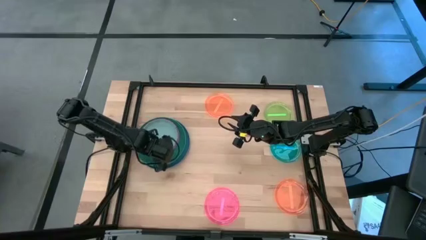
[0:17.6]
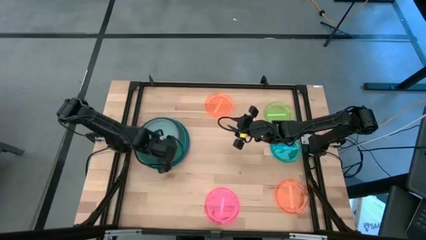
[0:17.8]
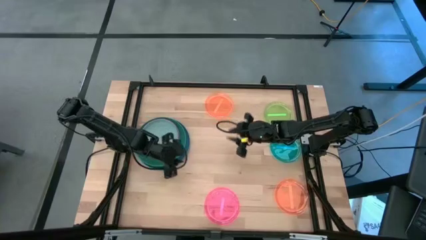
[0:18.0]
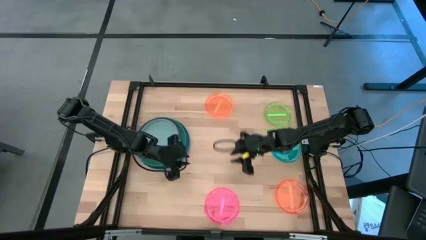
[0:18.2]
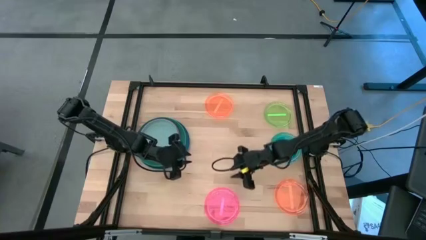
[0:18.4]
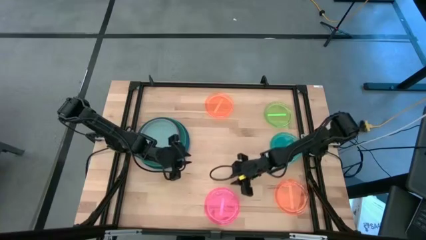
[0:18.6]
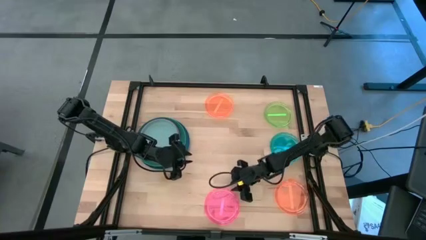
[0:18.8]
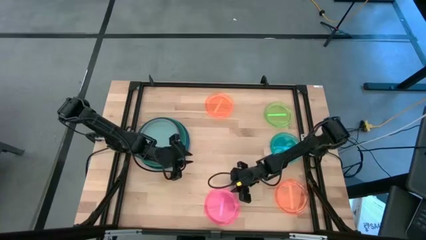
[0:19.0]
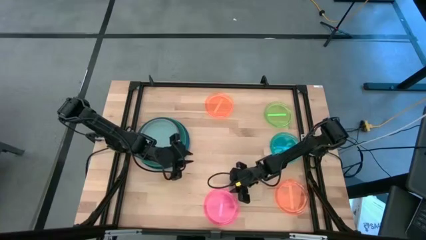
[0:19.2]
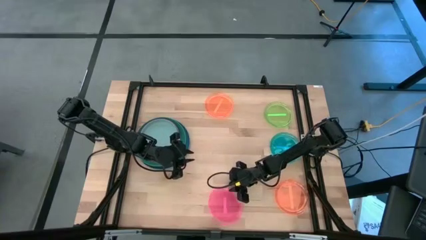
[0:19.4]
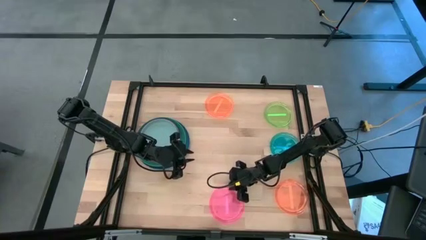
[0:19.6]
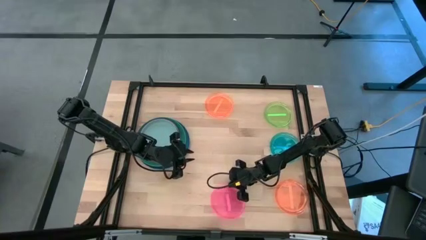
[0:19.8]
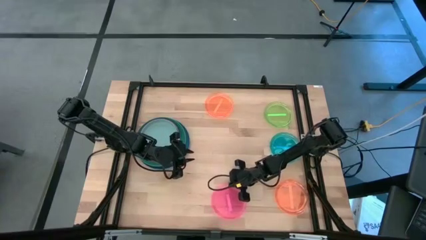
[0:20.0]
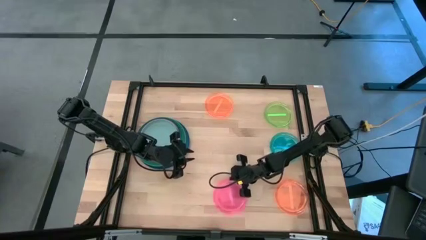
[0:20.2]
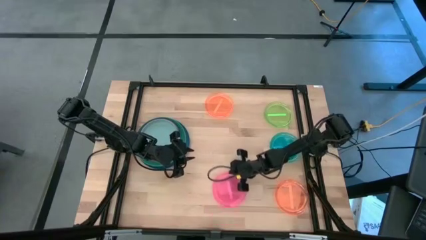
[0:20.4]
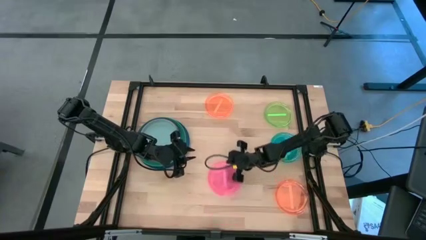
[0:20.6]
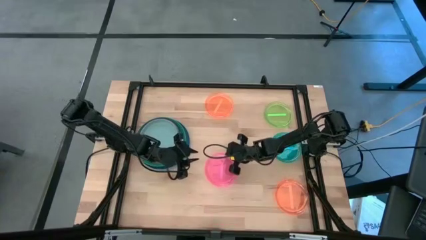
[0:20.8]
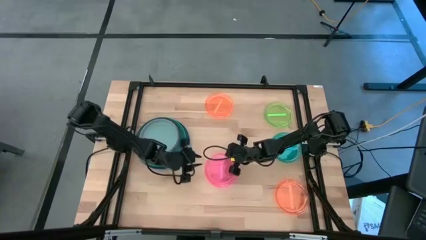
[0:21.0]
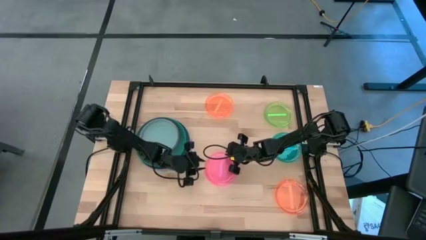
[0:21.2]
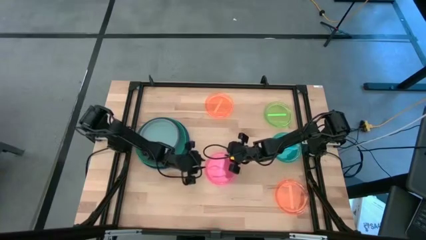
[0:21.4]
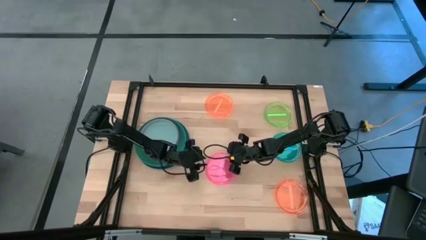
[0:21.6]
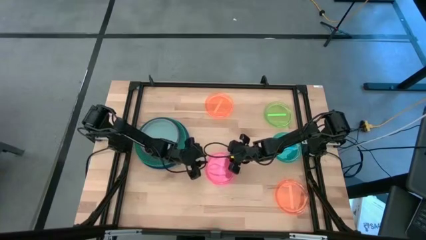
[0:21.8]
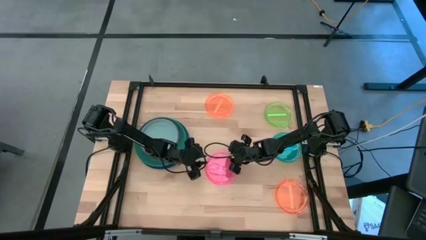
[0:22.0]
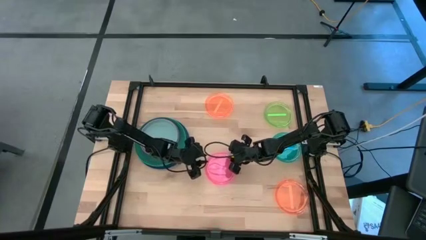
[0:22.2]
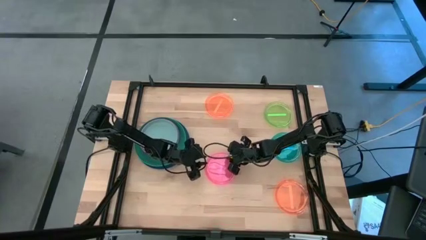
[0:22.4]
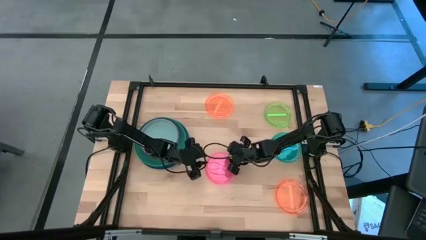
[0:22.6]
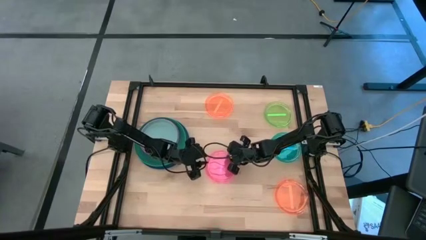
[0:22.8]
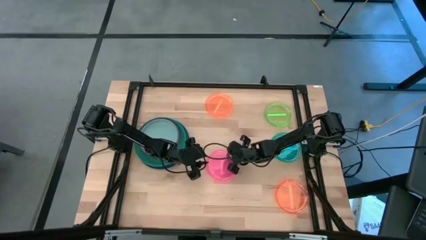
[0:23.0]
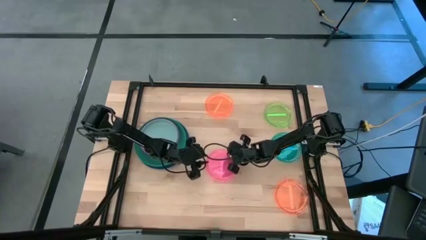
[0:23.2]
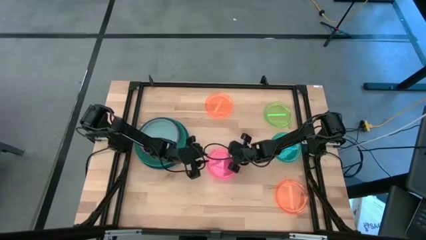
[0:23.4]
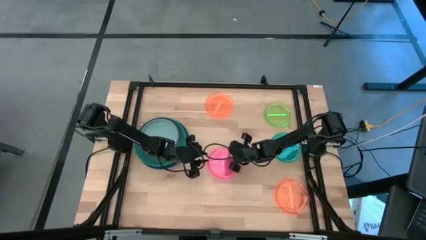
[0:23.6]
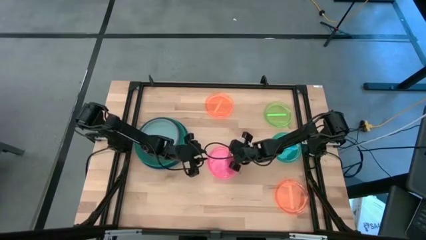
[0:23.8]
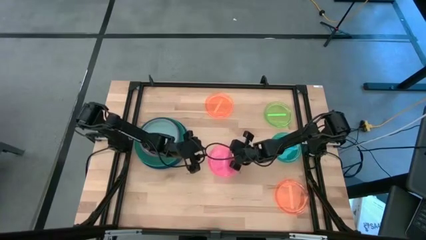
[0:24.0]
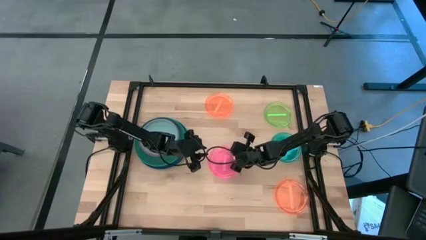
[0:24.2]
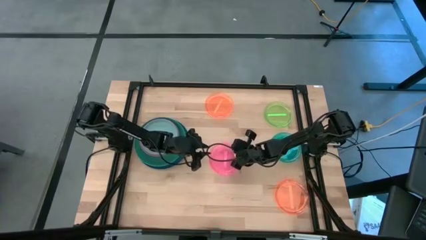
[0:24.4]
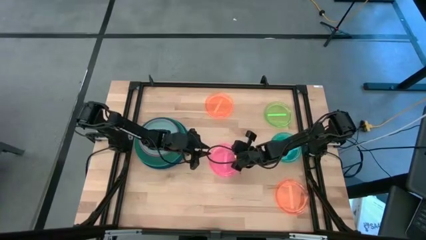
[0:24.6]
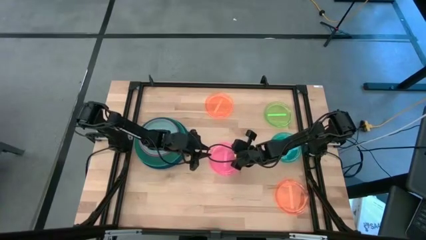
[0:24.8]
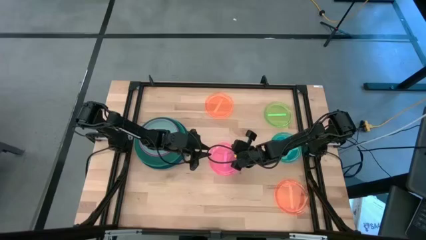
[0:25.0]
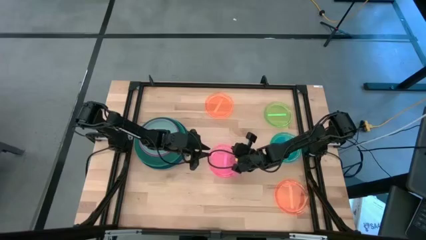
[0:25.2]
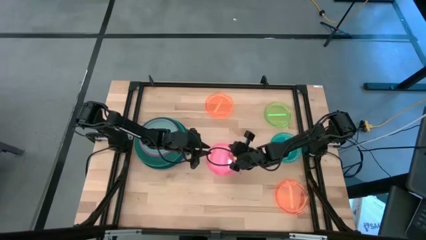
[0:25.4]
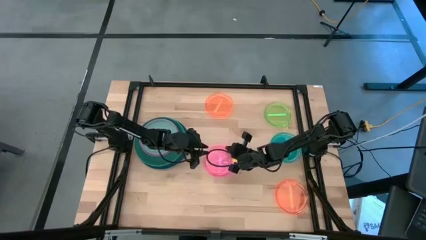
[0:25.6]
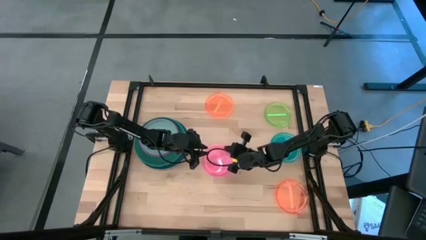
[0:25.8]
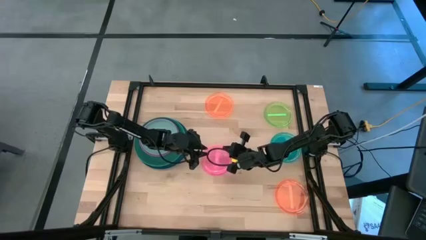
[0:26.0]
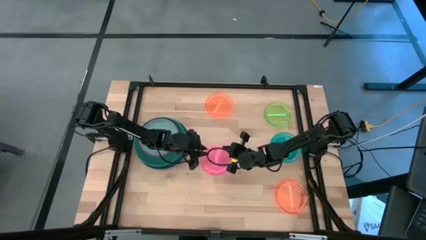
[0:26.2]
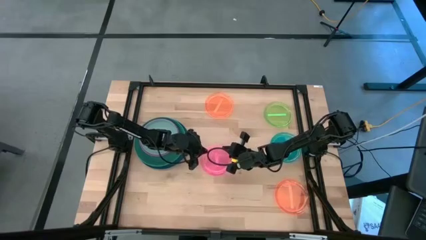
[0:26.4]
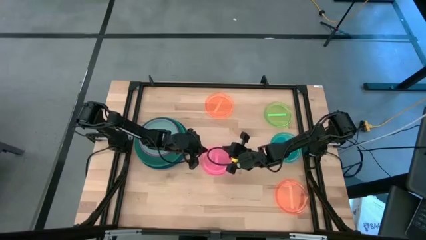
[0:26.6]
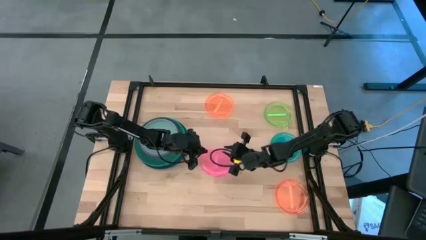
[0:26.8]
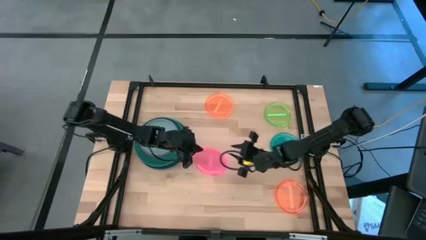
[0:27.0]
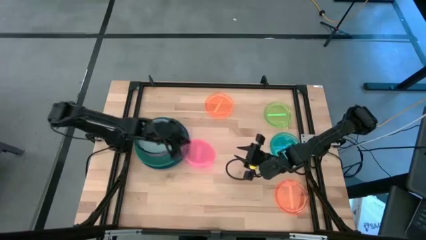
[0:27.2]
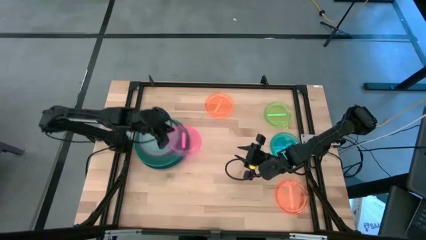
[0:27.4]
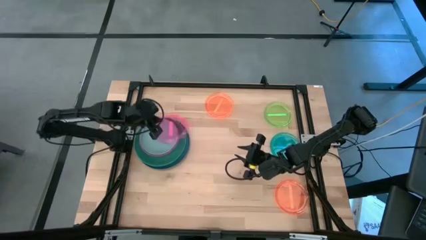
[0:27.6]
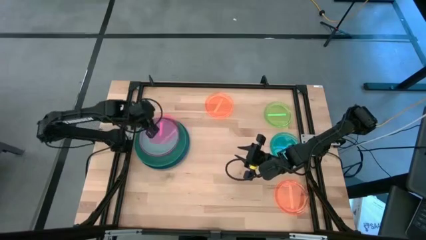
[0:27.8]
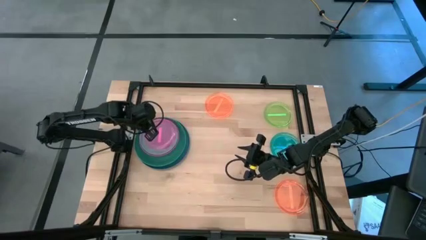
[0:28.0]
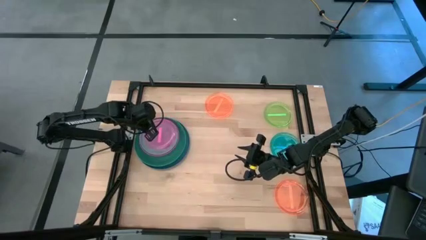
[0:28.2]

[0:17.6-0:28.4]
Task: Stack plastic plates
Stack the small light pink plate on top of the medium light blue plate

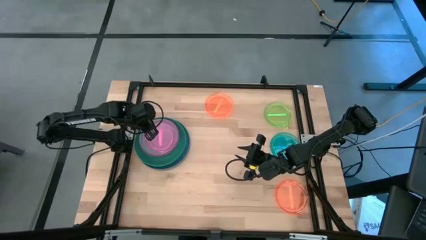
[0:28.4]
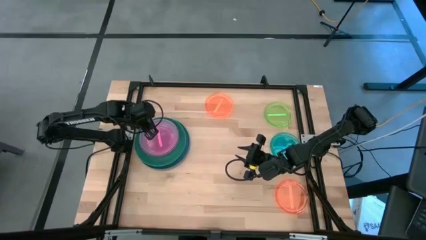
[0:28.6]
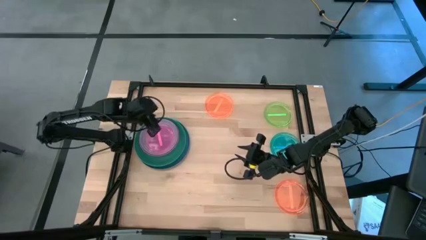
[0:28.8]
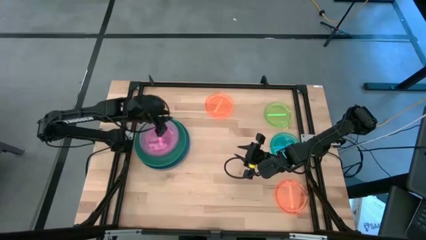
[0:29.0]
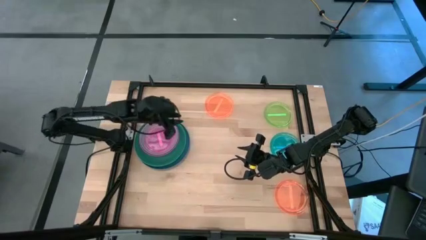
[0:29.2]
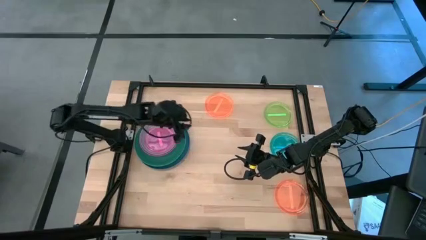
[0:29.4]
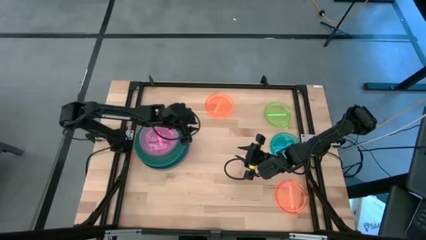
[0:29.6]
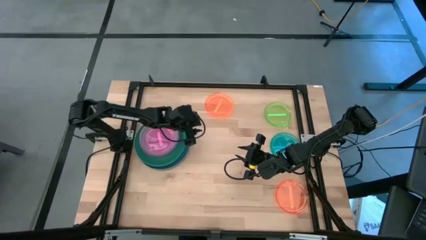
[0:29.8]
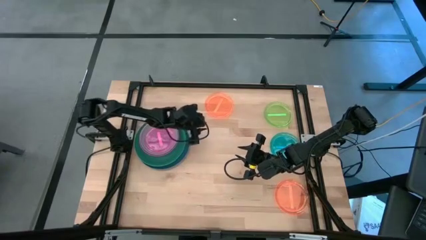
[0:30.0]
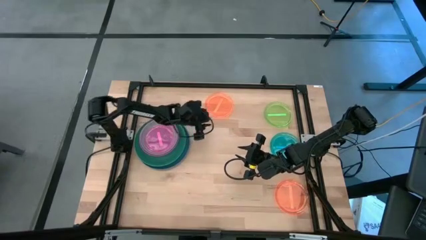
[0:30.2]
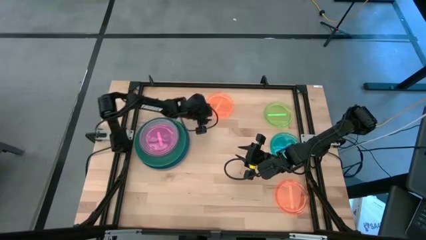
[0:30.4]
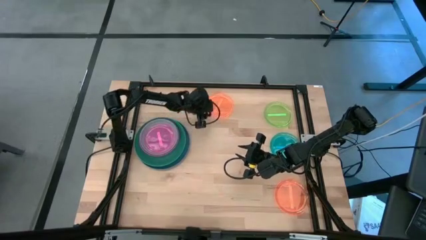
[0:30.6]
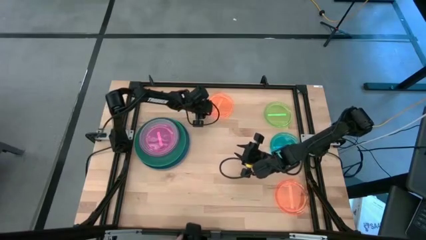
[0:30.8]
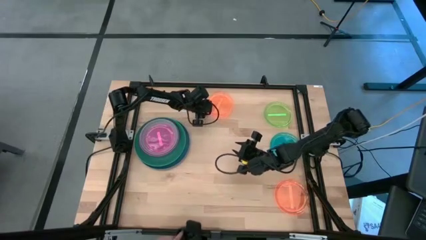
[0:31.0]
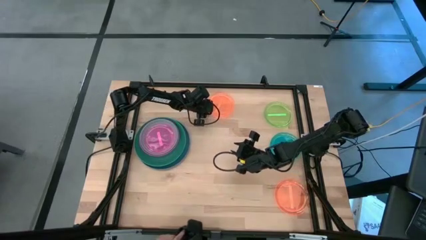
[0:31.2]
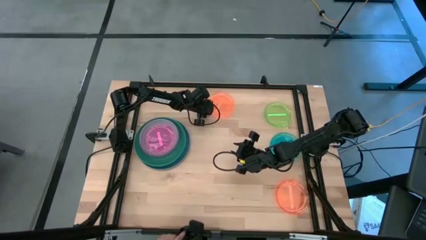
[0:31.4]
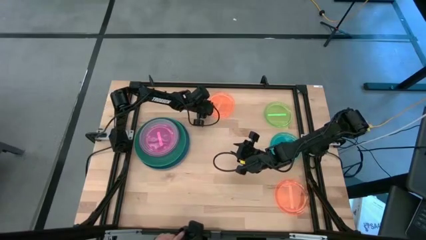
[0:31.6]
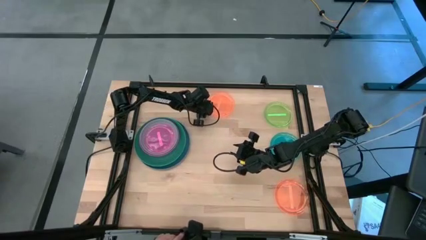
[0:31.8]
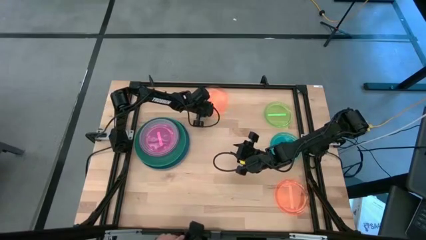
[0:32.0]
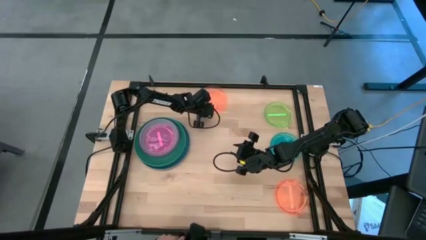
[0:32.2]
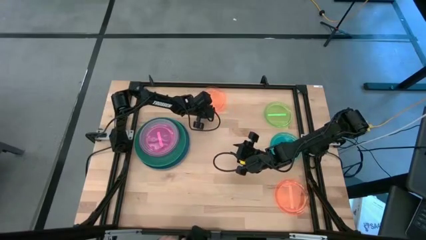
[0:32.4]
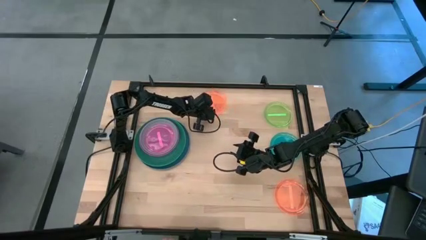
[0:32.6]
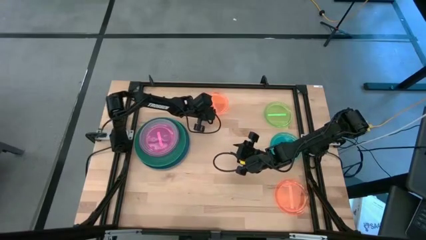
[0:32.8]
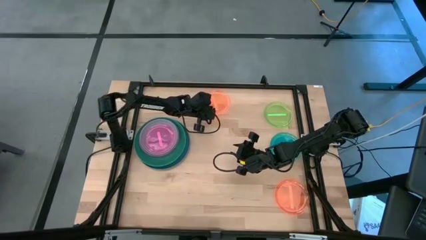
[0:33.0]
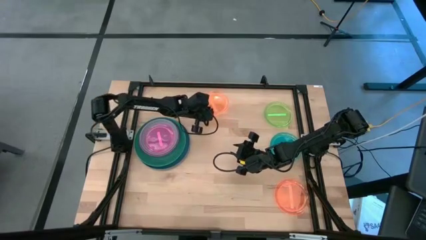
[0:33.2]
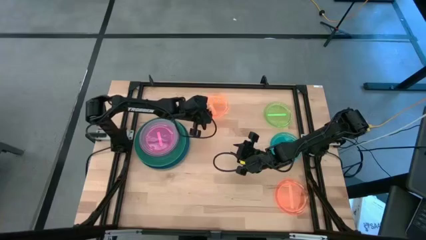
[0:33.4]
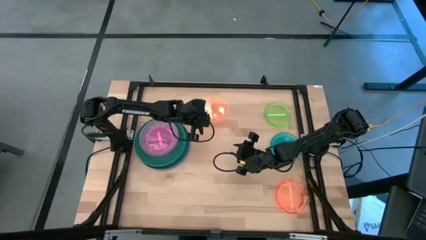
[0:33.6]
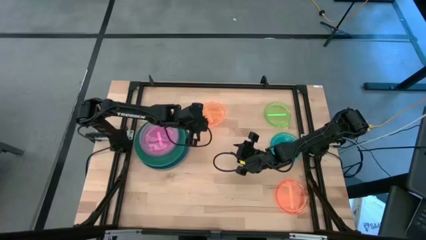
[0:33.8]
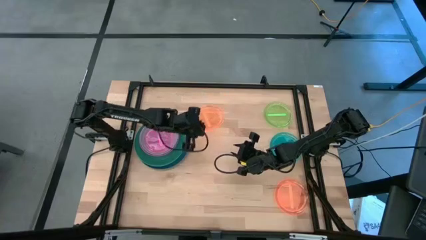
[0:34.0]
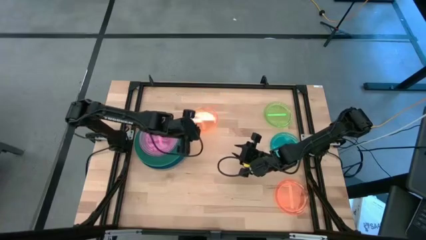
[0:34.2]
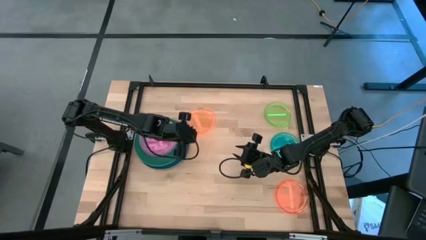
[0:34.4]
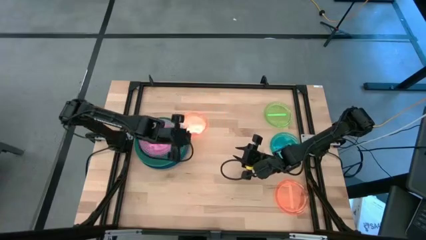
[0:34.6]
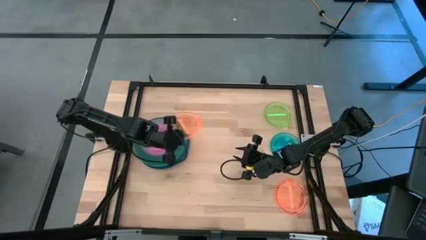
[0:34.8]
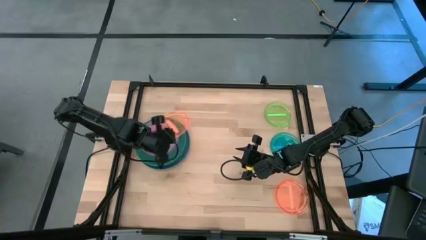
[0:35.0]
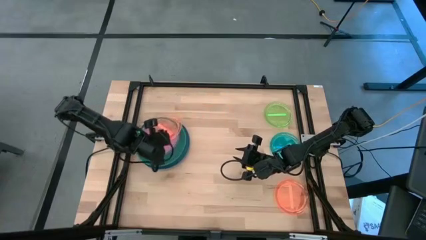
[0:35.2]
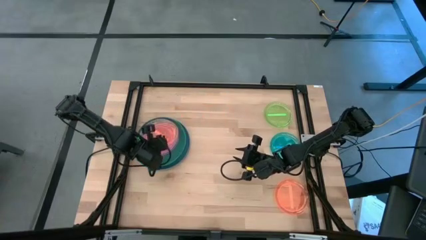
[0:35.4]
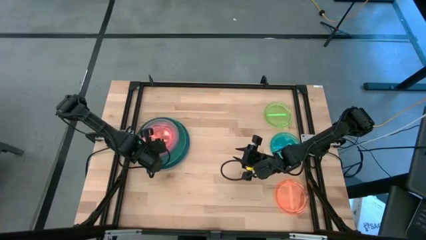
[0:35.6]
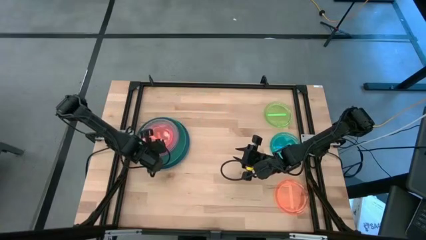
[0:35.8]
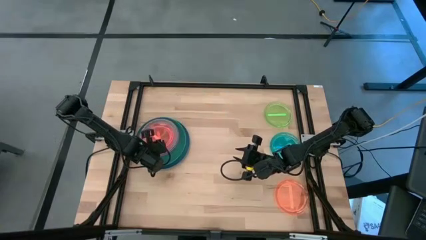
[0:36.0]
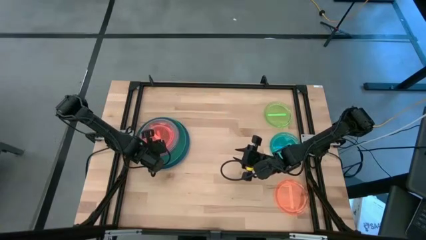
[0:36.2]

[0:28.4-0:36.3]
Stack the top small orange plate on top of the small light pink plate
